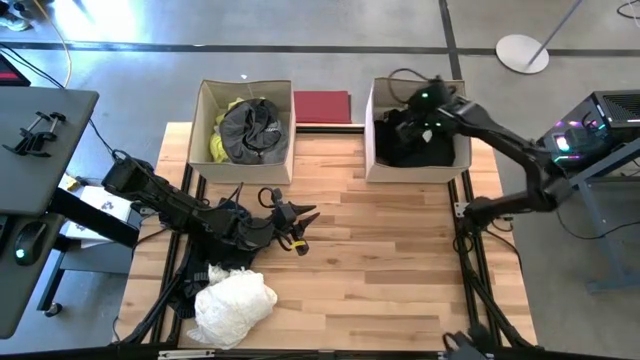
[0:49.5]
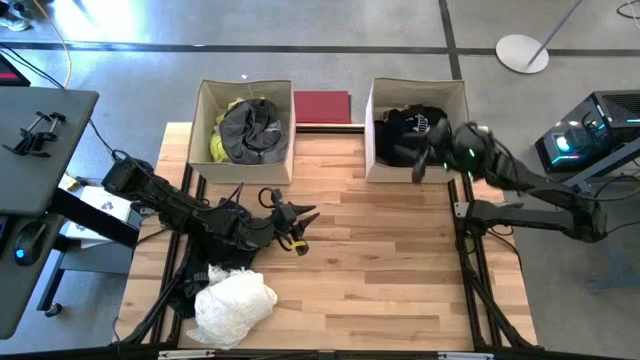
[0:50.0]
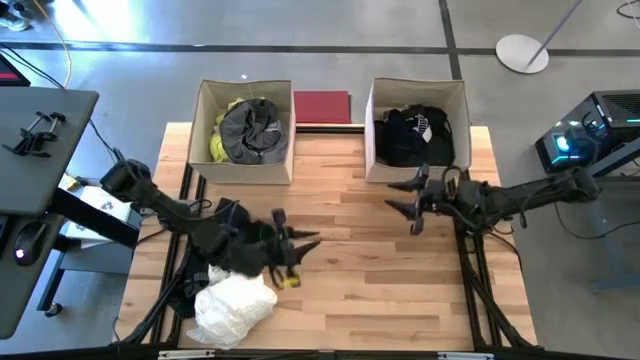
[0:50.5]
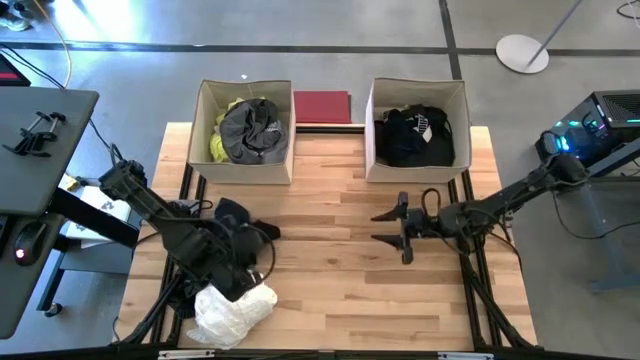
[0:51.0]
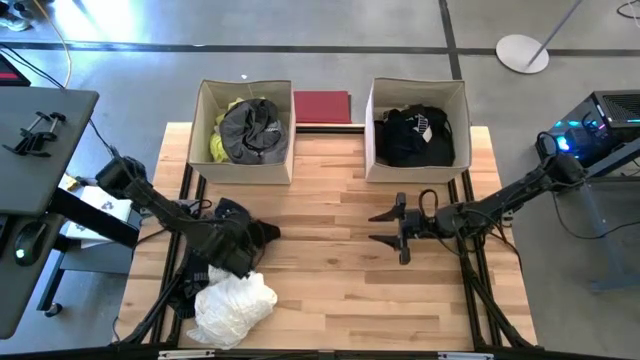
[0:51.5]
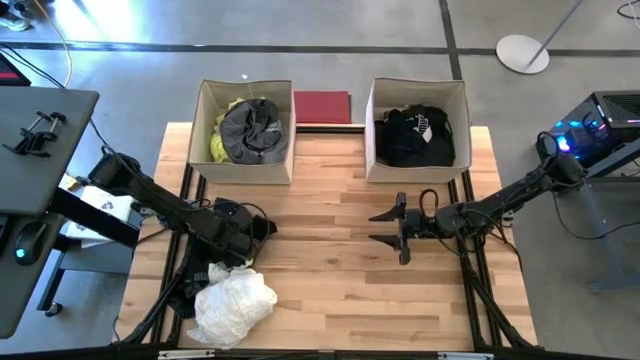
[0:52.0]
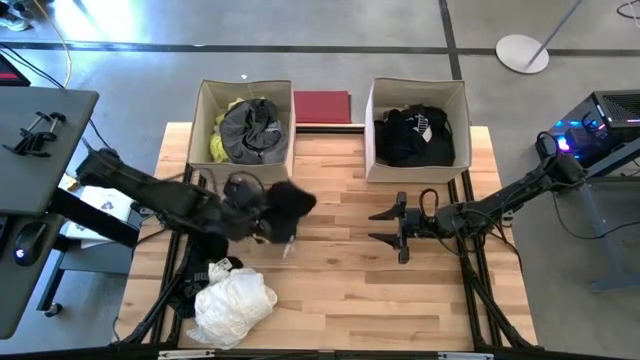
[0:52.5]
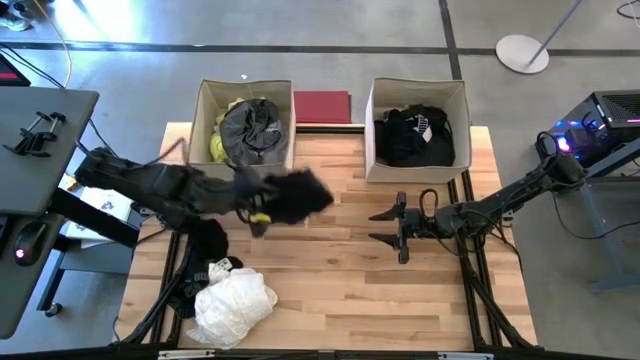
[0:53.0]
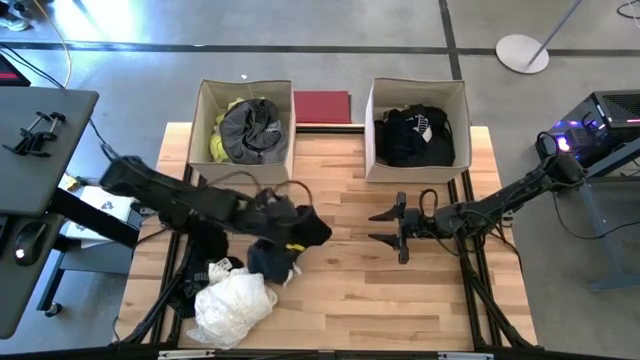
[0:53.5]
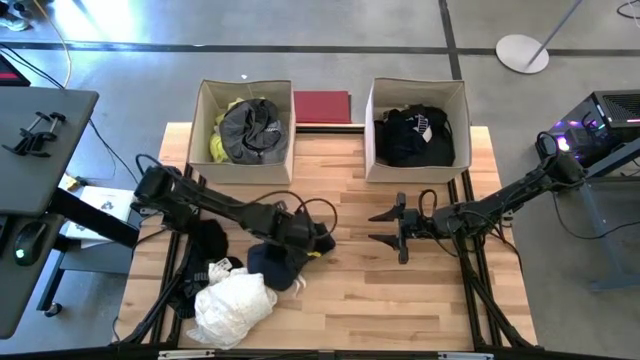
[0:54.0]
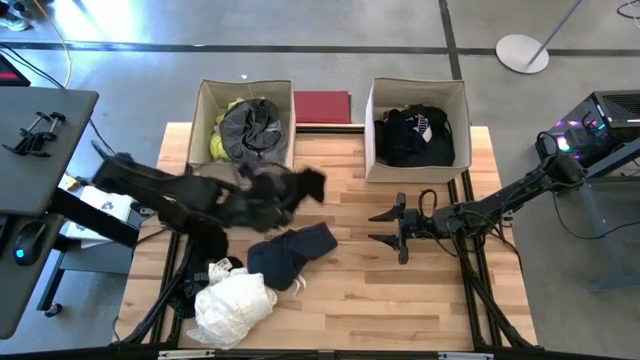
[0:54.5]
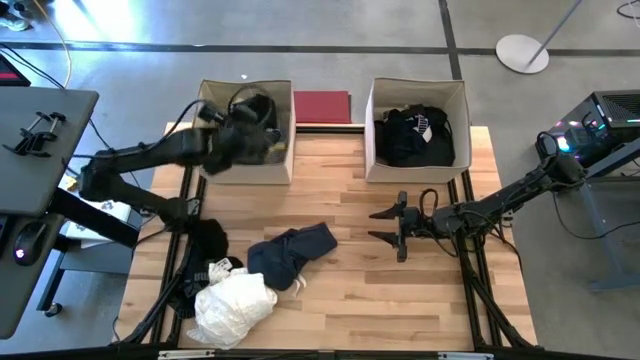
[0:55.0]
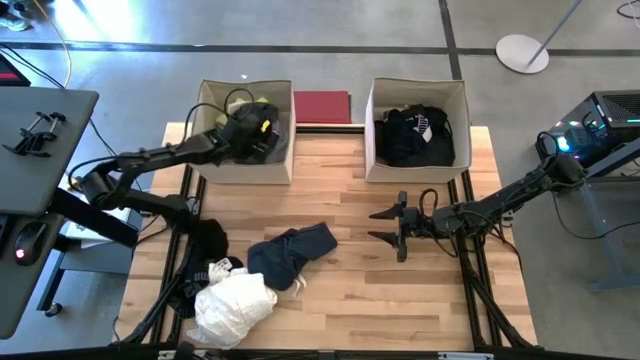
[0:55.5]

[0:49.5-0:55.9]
Task: Sort clothes
Put the black shorts into the right brown laundry organizer

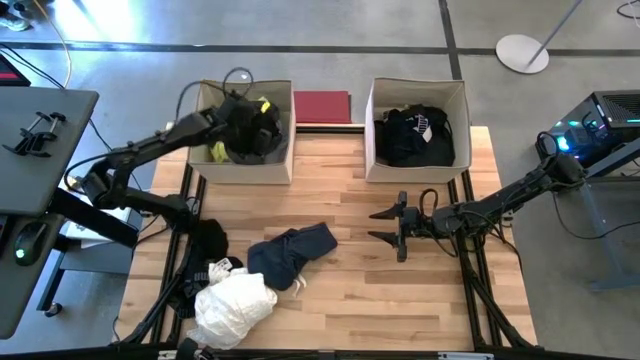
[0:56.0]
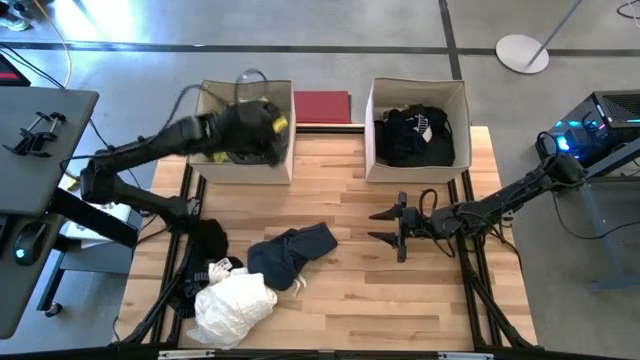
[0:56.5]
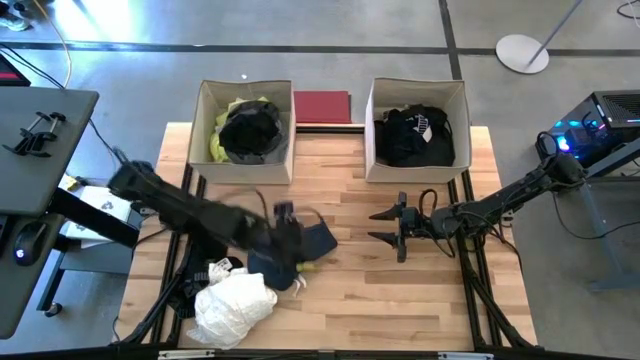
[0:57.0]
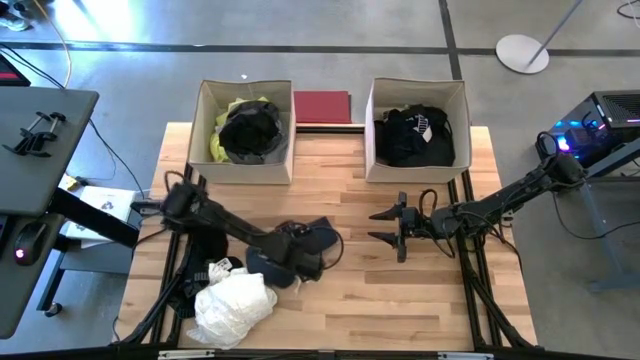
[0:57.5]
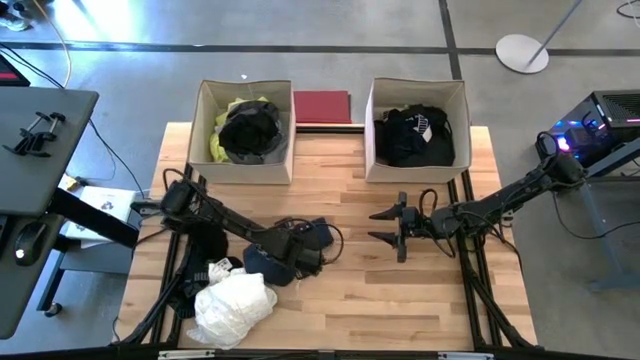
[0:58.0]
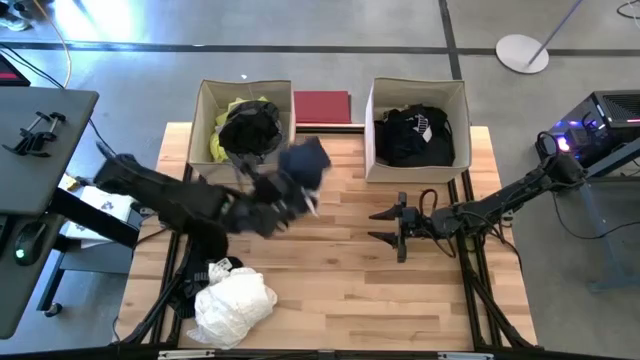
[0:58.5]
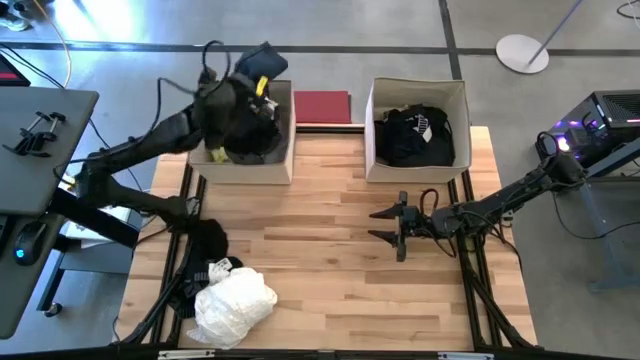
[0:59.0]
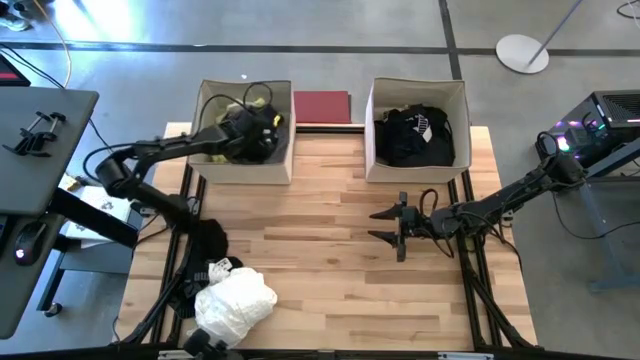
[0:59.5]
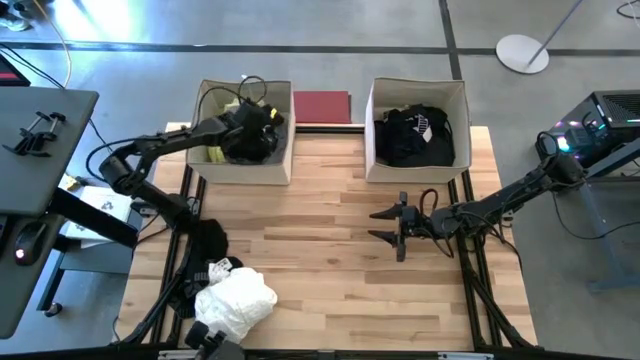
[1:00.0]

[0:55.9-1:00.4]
Put the dark blue shorts into the left brown laundry organizer

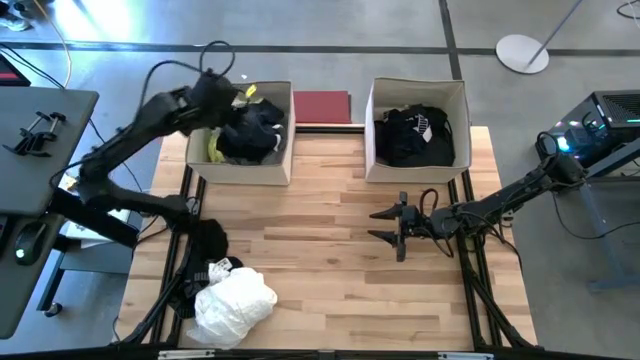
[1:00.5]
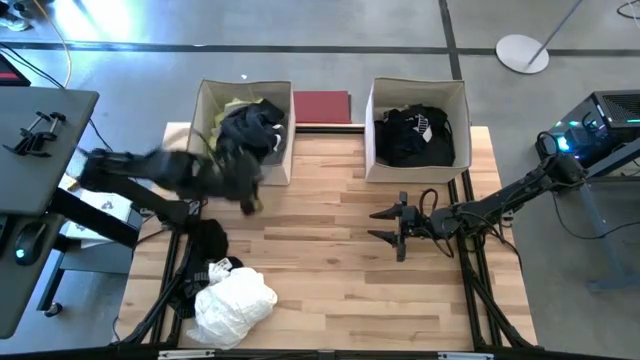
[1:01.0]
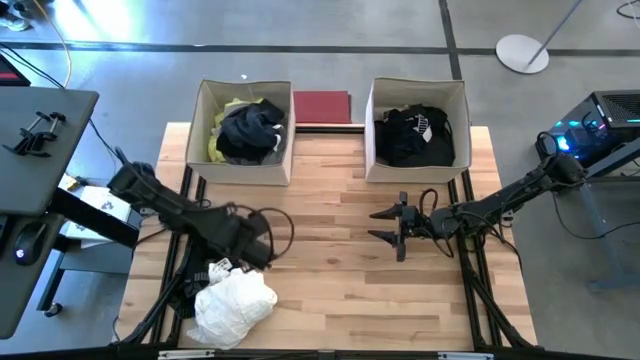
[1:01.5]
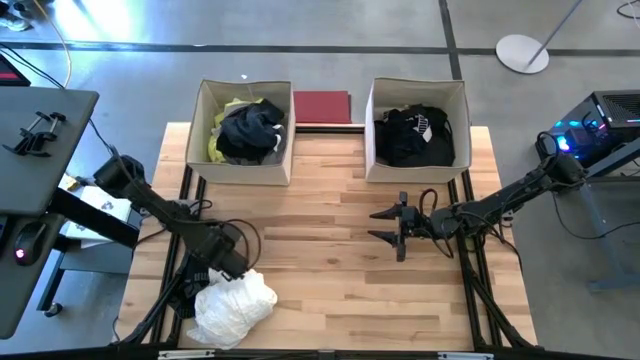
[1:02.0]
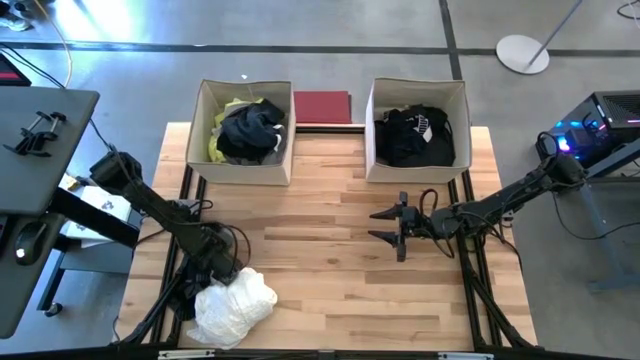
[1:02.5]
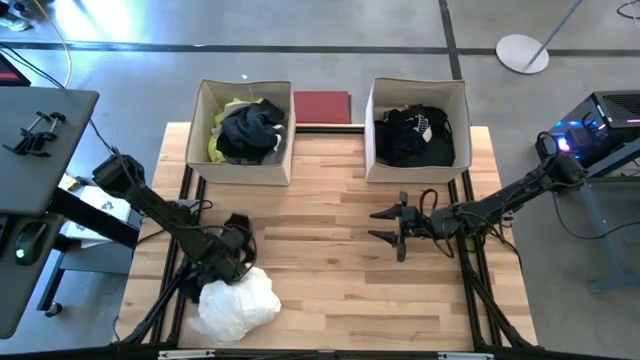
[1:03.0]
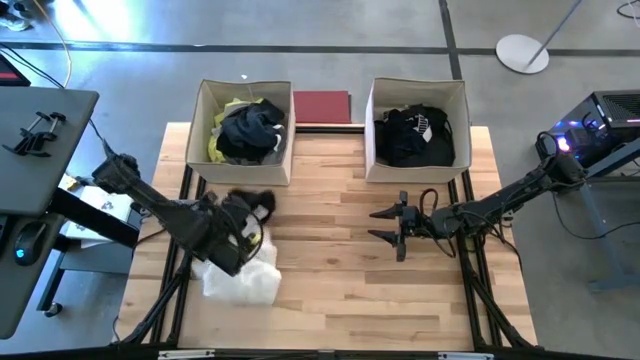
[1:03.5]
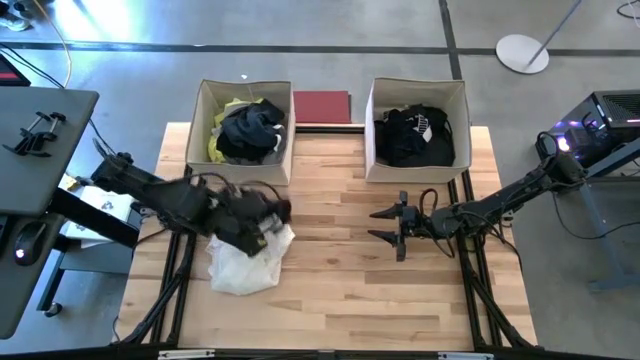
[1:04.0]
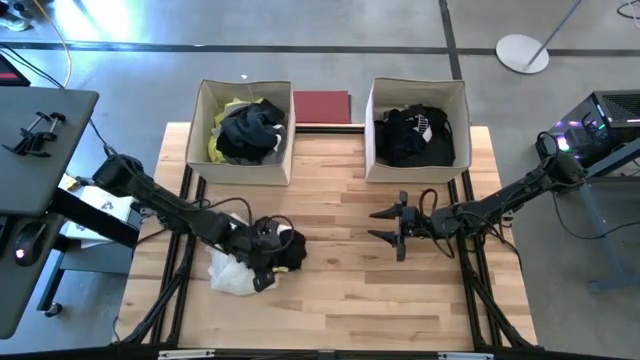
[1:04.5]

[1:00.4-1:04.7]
Put the black boxers into the left brown laundry organizer

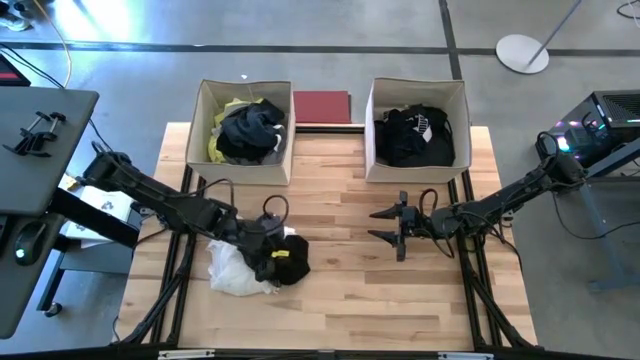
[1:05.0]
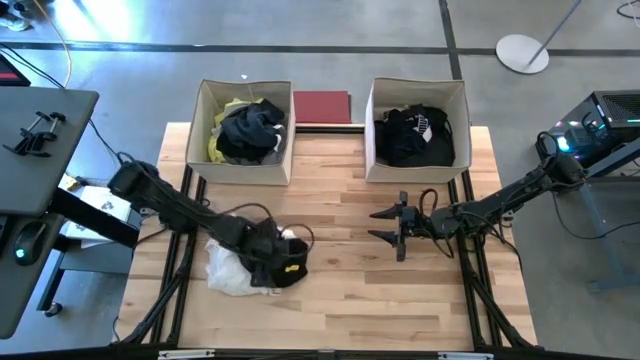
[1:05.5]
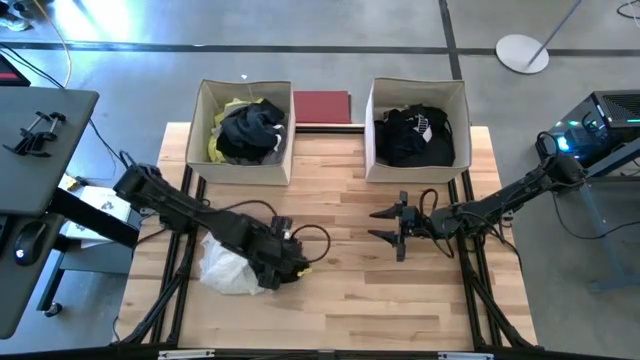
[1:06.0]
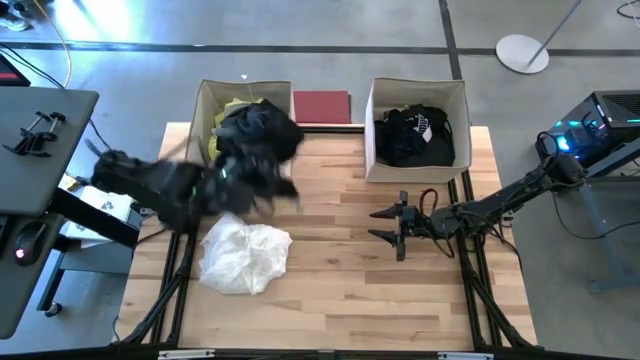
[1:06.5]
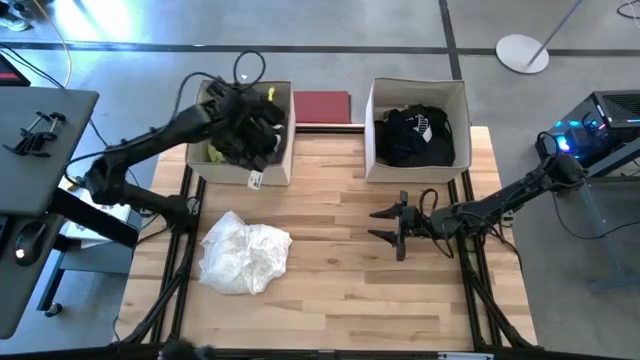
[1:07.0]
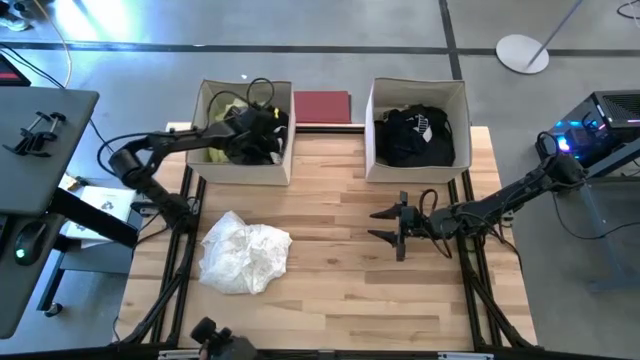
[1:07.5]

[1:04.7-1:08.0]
Put the black boxers into the left brown laundry organizer

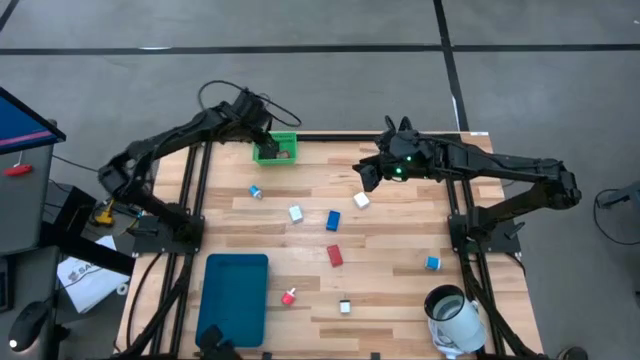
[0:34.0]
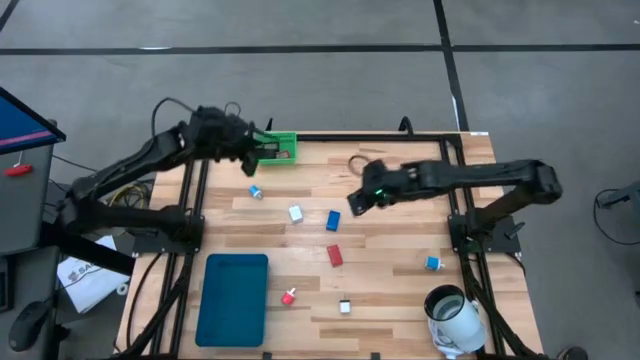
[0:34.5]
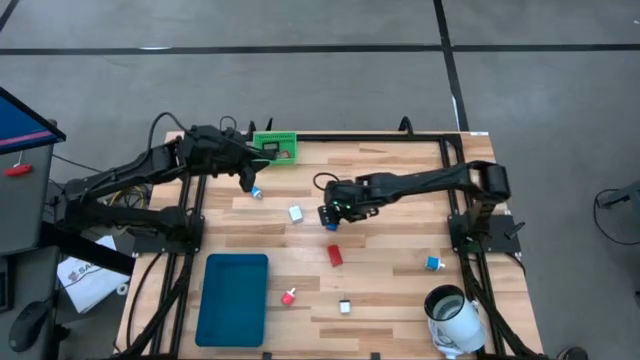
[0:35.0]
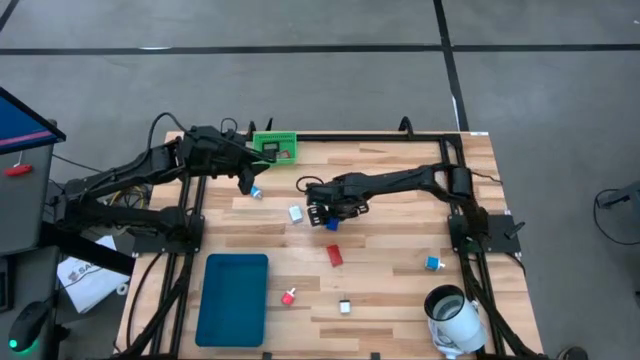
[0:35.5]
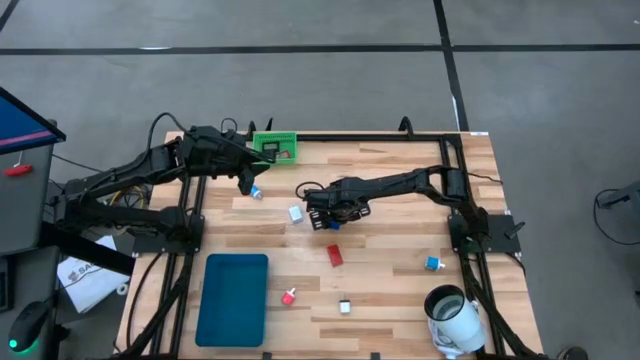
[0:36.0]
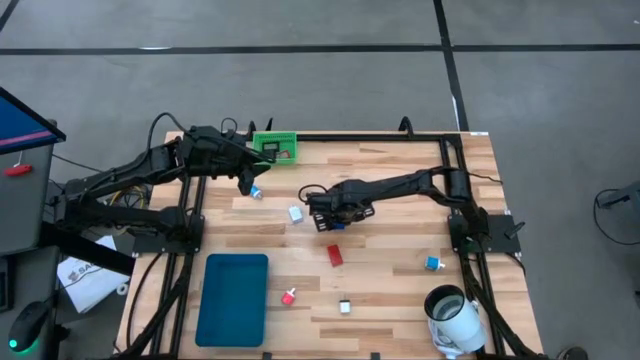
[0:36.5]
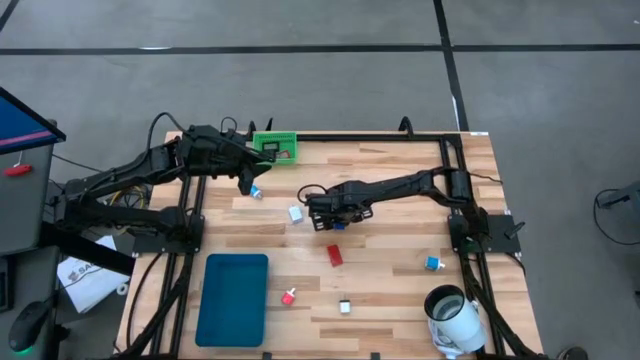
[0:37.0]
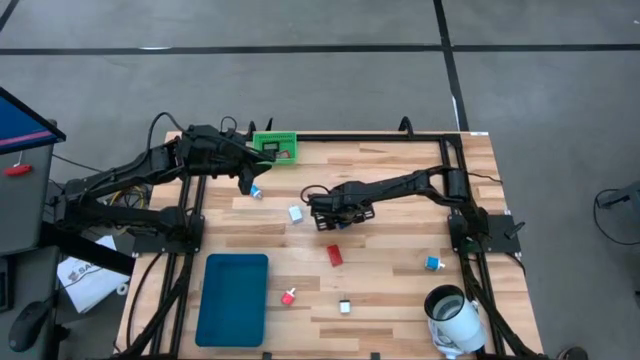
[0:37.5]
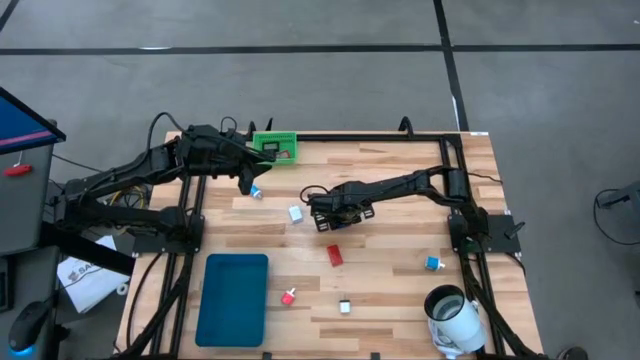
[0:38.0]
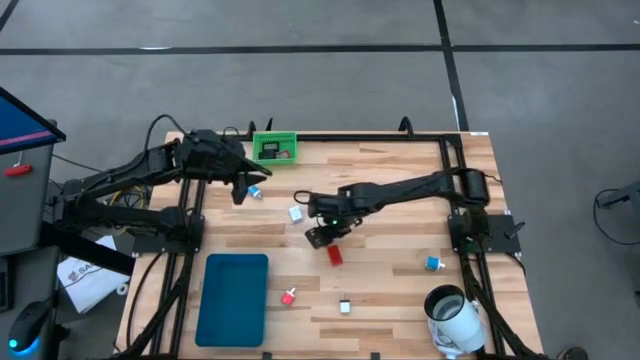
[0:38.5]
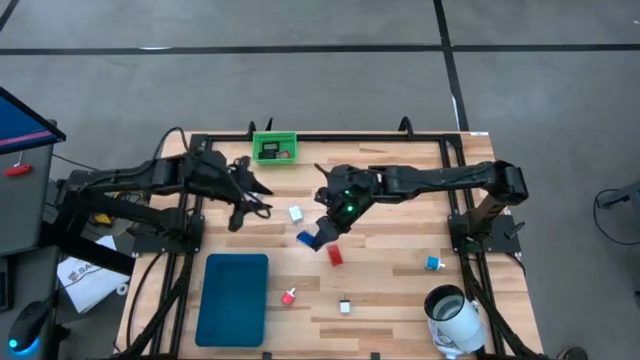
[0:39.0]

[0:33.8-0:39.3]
Task: Pick & Place Office items
Put the blue digital clock into the green bin
